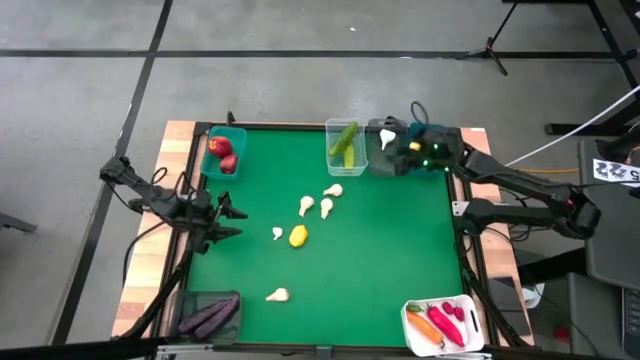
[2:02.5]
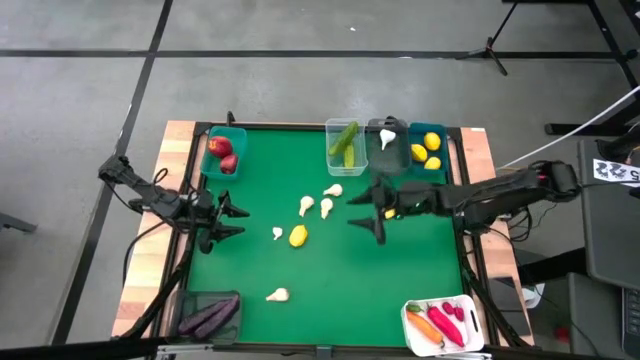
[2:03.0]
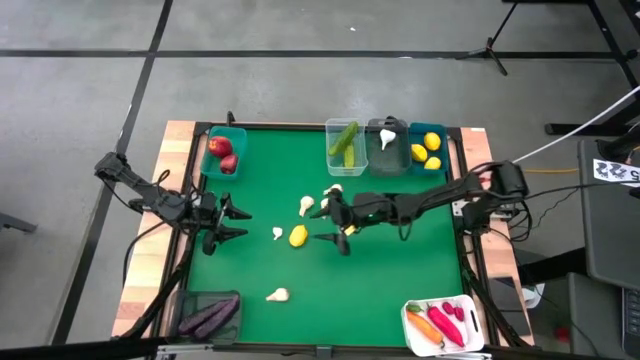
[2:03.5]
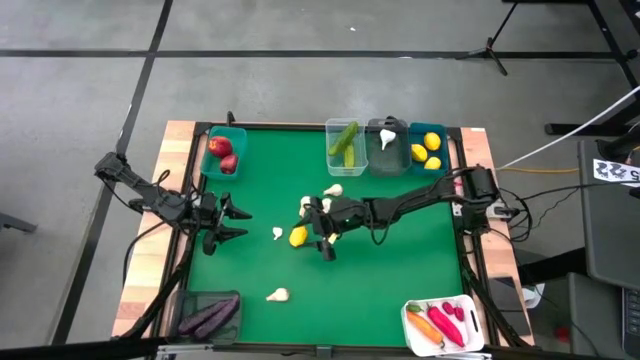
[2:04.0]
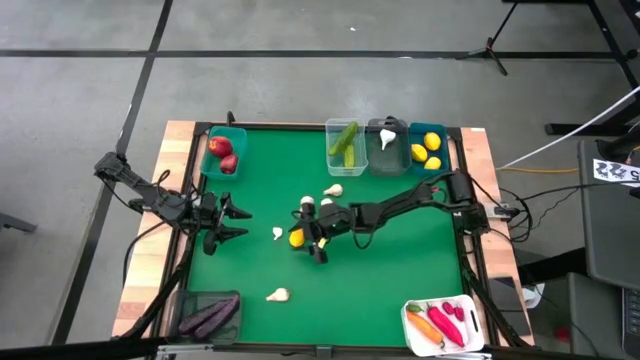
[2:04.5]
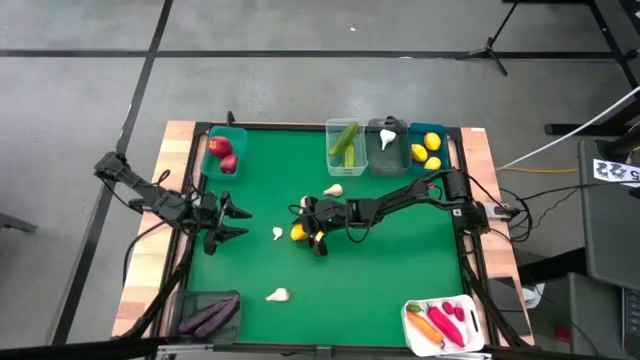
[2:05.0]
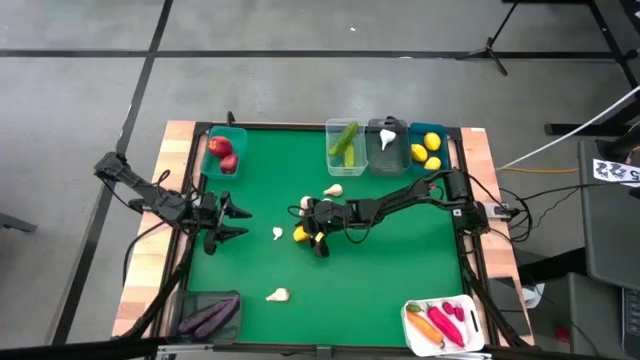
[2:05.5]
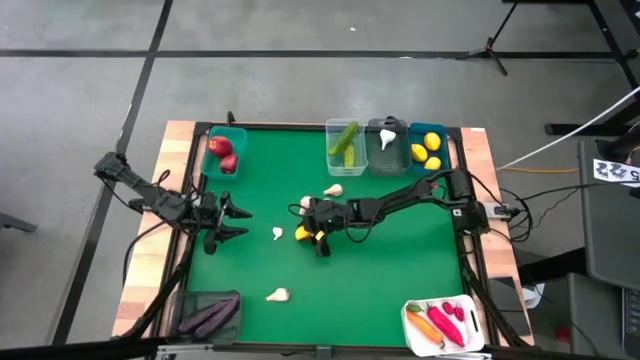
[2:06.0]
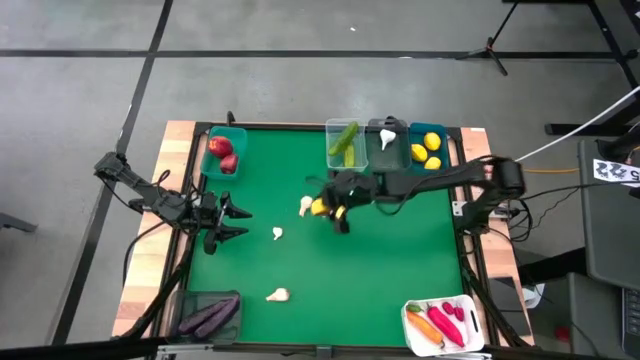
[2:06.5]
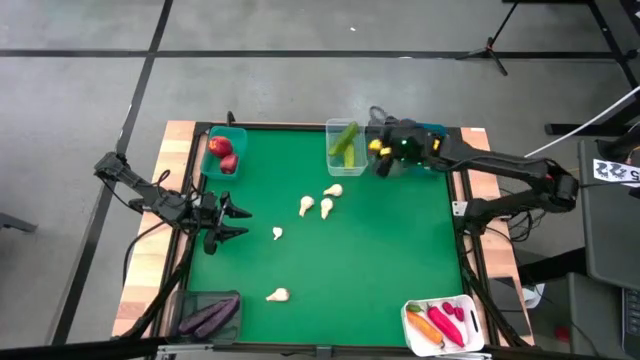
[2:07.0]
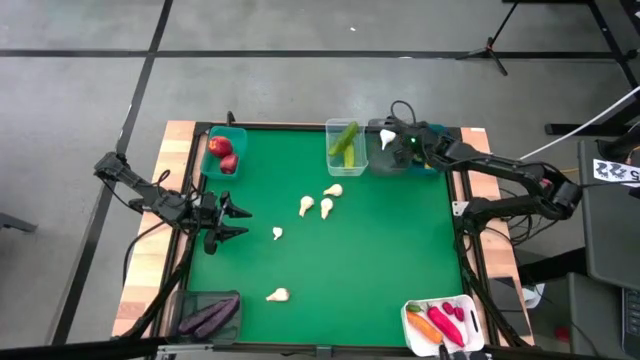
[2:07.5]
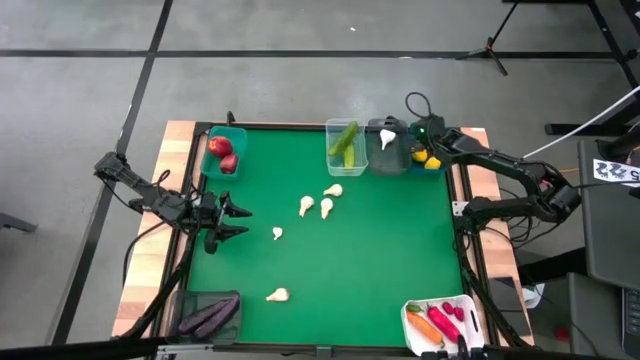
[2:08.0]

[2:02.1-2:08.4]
Task: Sort produce into baskets
Put the yellow lemon into the blue bin

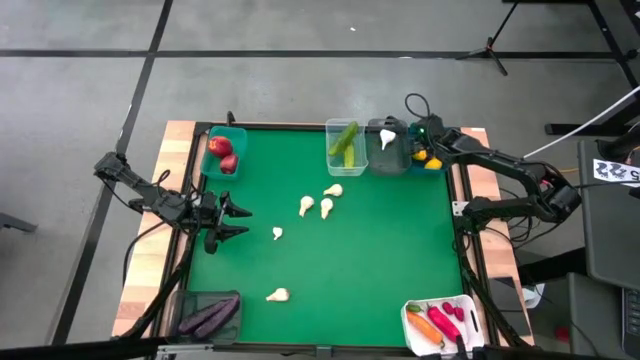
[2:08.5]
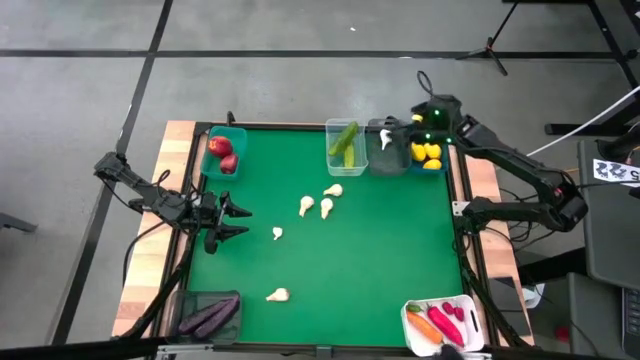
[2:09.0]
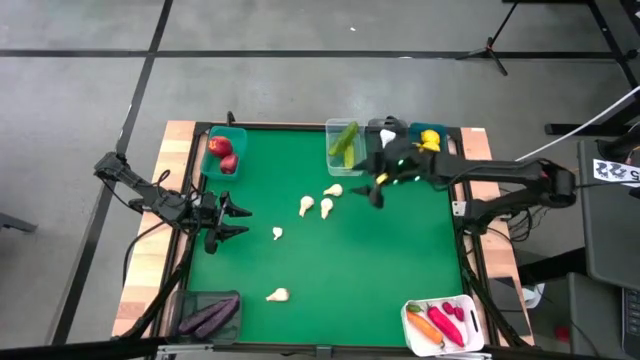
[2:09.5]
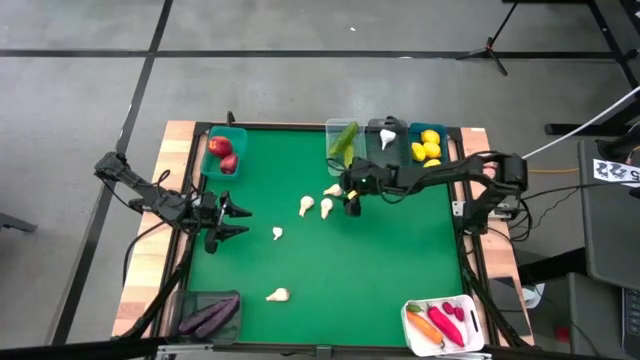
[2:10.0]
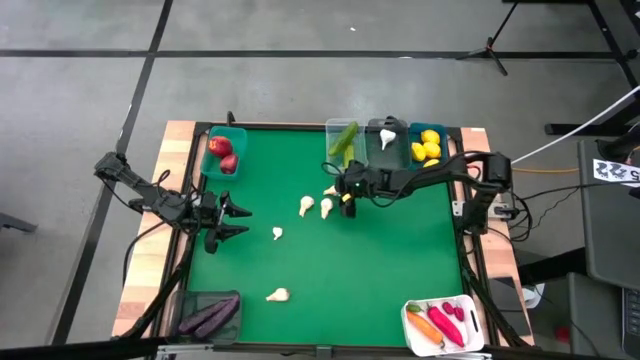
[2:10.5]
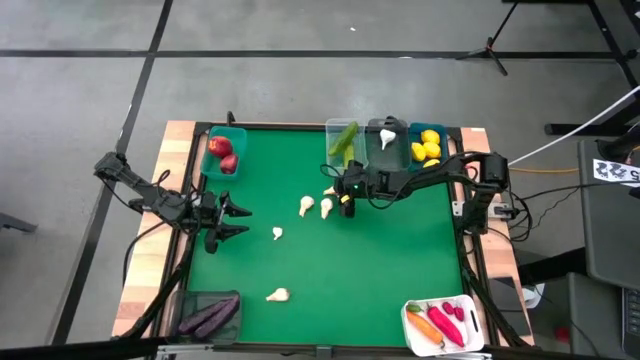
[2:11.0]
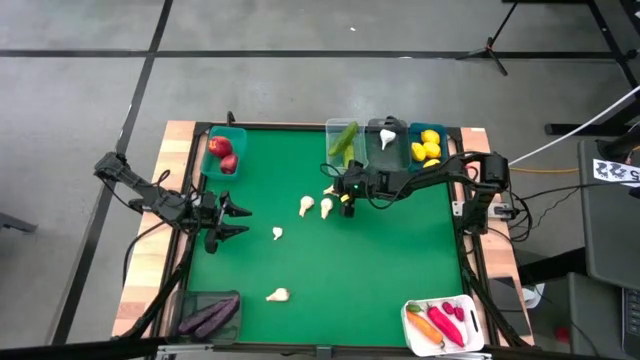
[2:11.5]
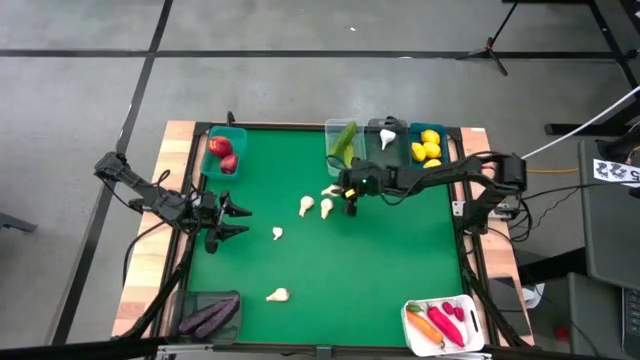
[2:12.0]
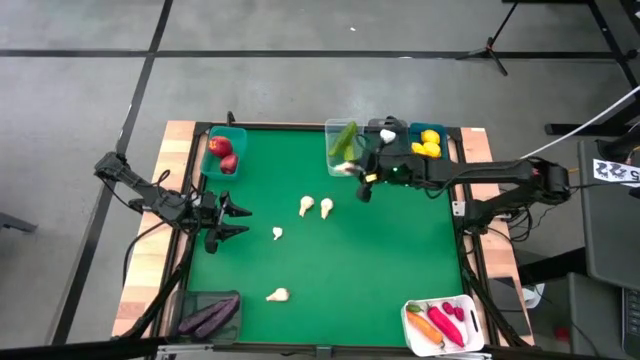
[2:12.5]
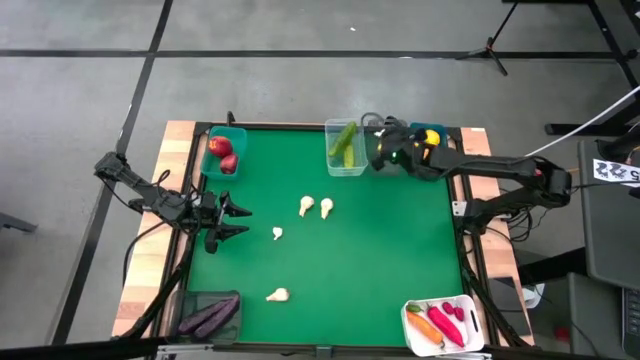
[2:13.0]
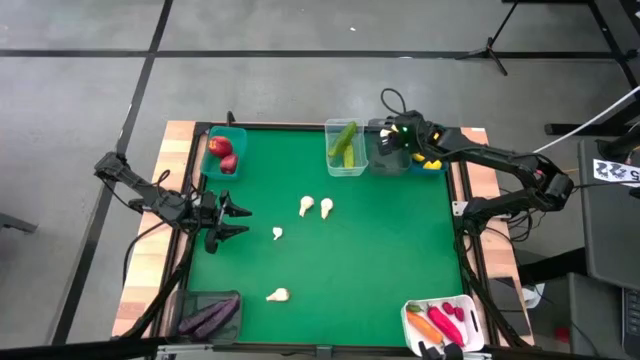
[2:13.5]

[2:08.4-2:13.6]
Put the white garlic into the top black transparent bin

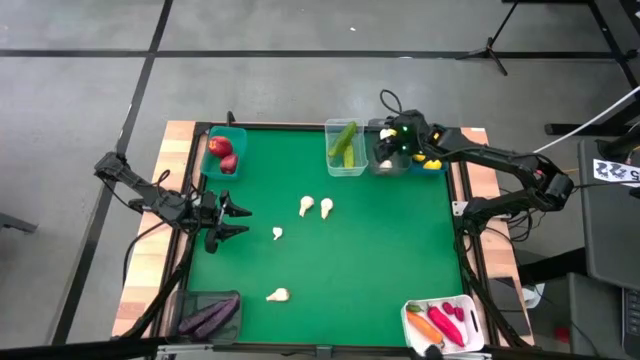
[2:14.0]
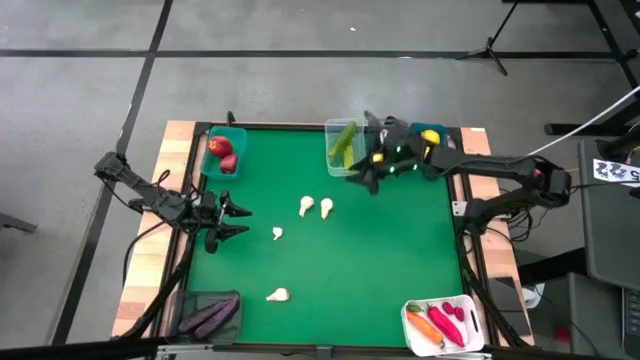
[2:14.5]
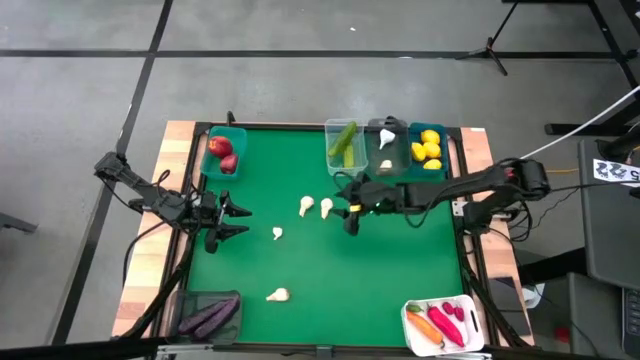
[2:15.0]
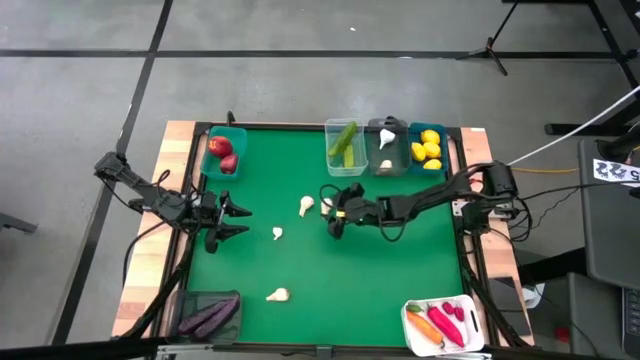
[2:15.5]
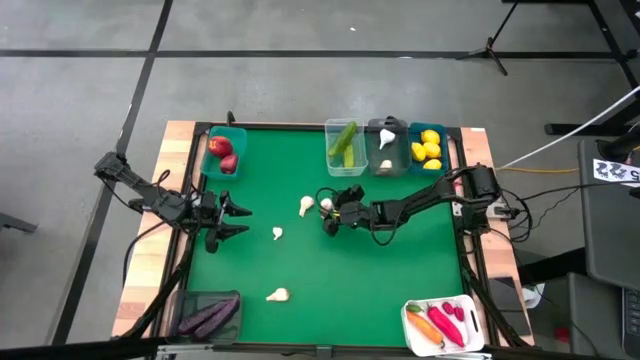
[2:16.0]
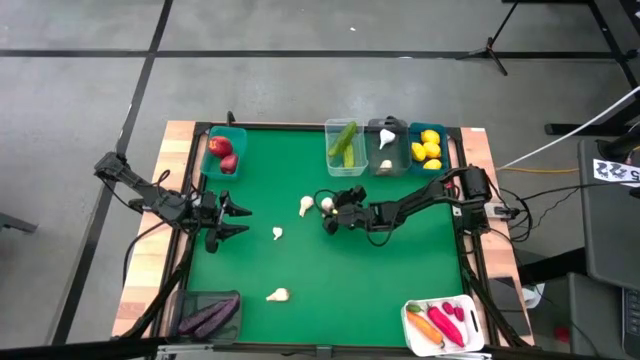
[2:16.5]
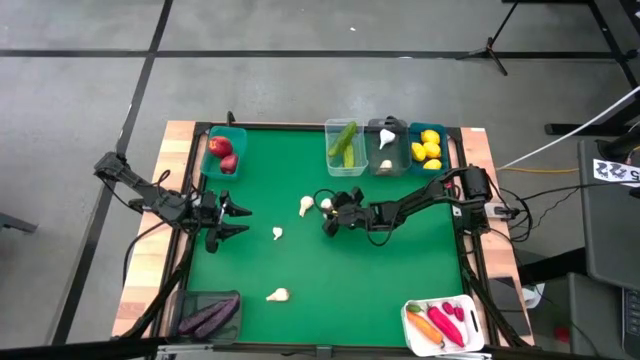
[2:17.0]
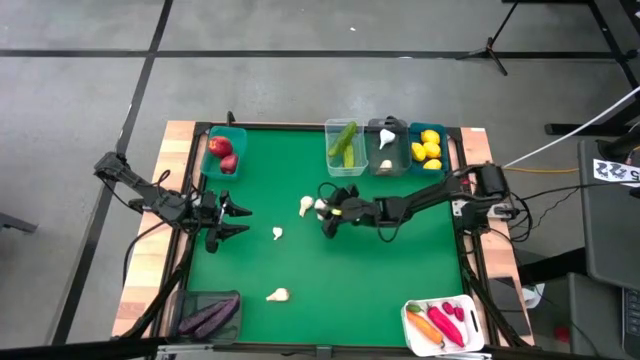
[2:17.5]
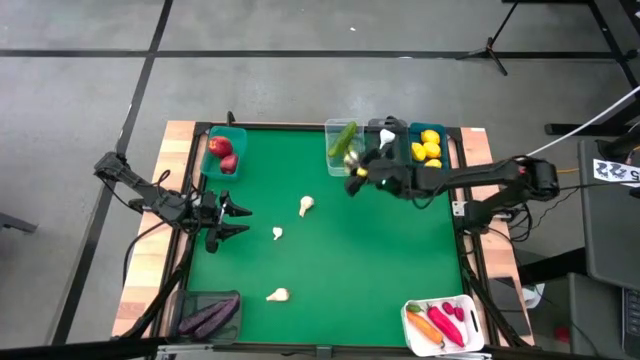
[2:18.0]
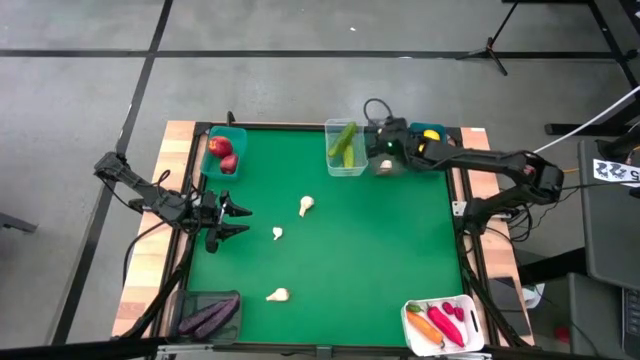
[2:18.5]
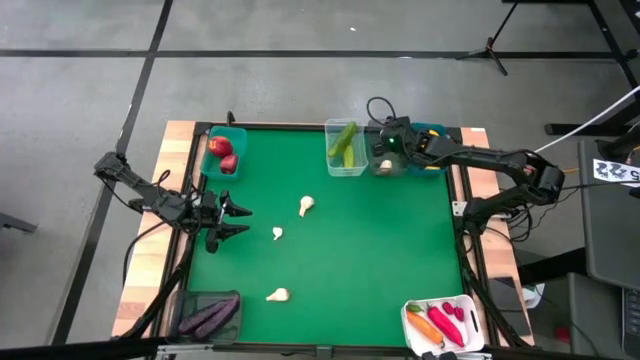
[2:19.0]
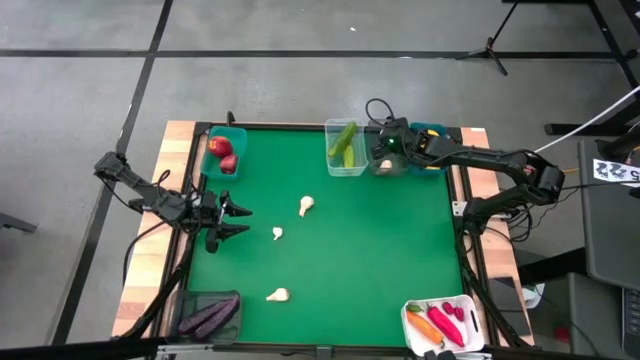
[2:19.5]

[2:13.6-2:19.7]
Put the white garlic into the top black transparent bin

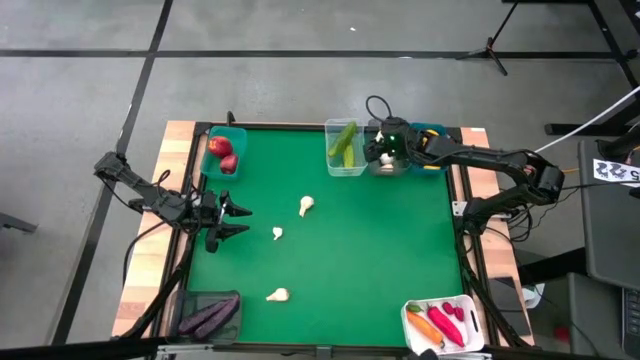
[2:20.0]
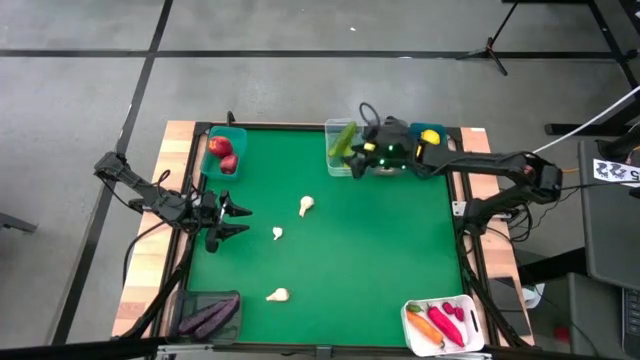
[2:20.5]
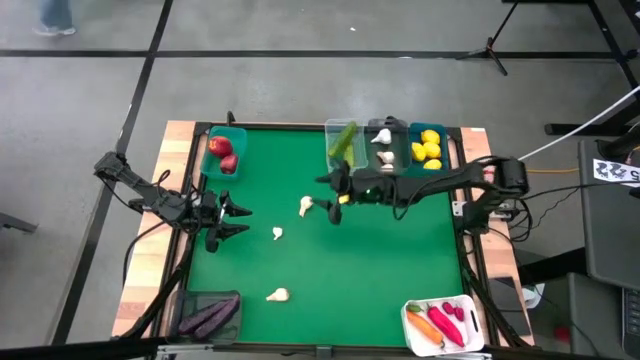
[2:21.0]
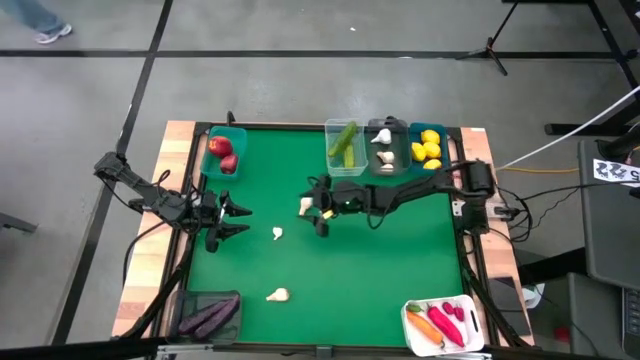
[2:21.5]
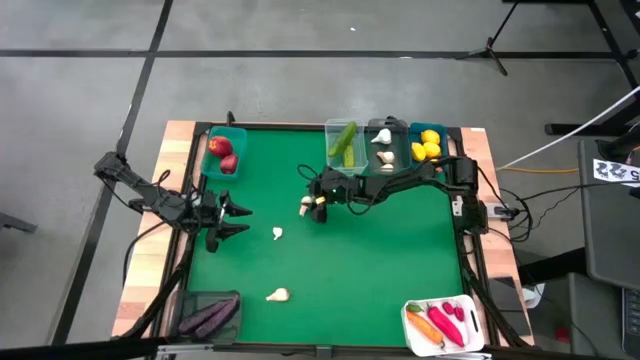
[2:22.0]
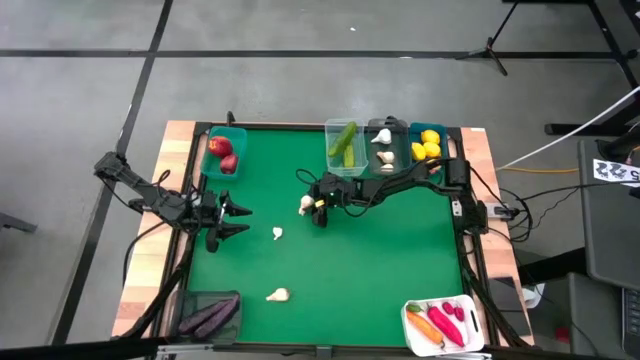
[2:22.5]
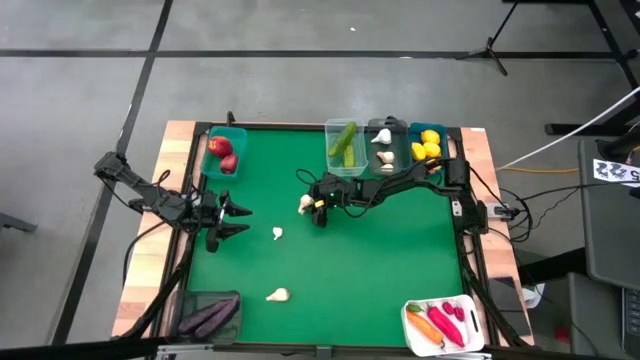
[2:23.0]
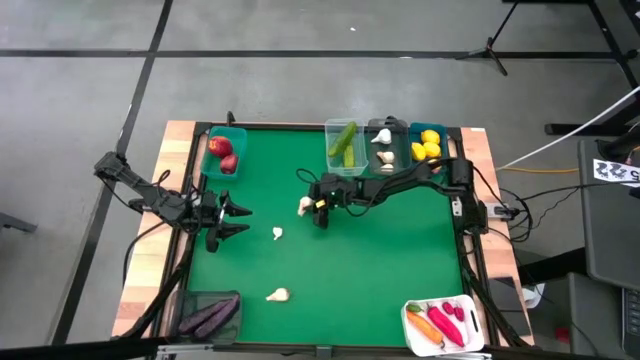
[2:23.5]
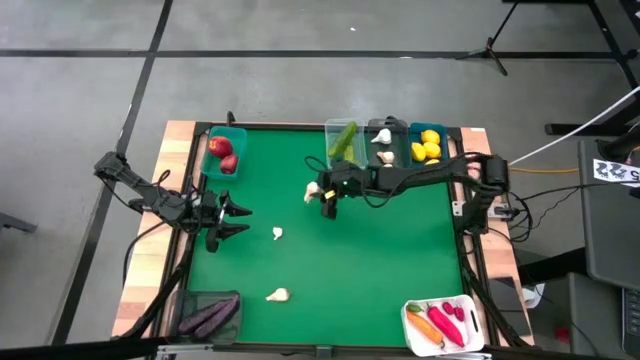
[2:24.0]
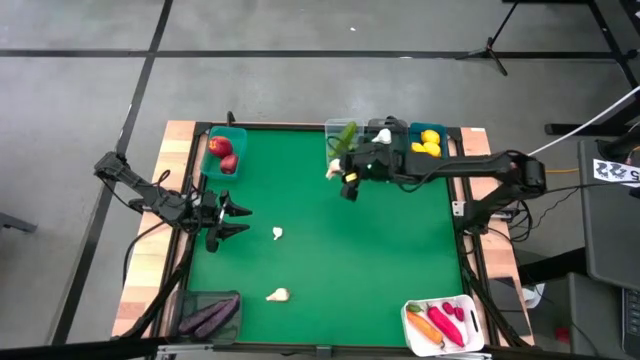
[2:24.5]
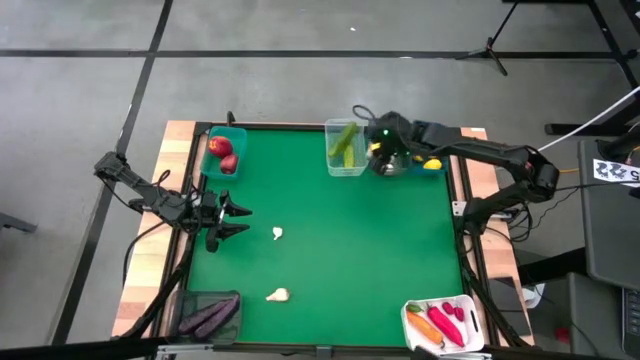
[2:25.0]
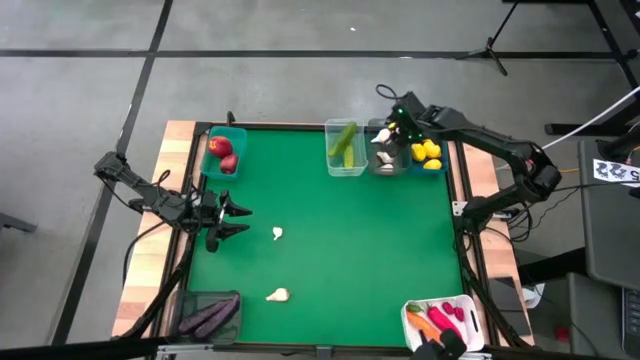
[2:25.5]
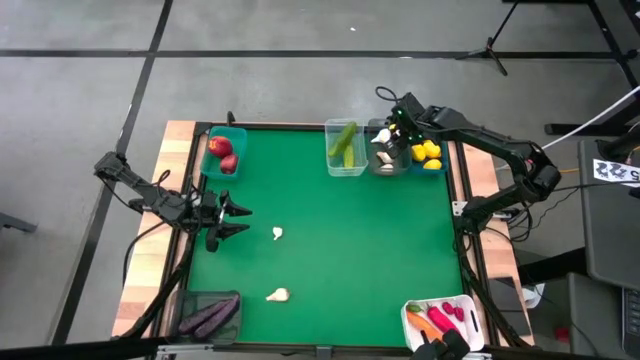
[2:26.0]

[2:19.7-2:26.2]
Put the white garlic into the top black transparent bin
